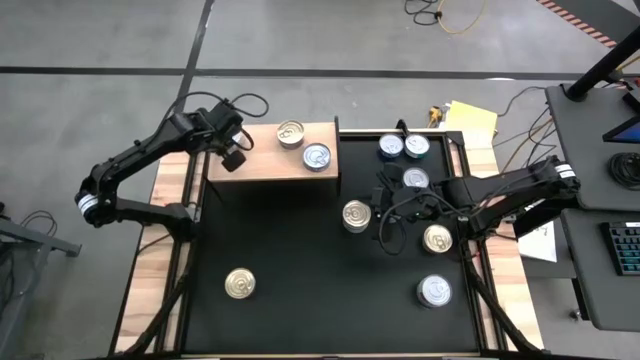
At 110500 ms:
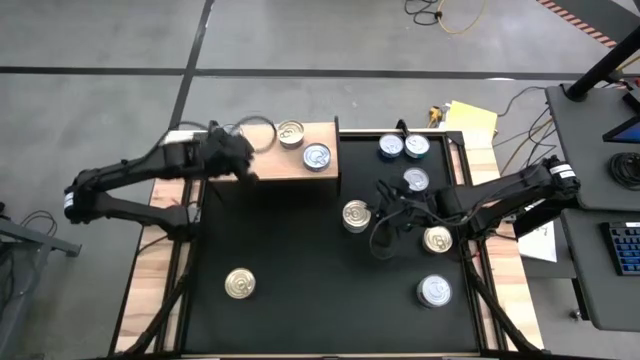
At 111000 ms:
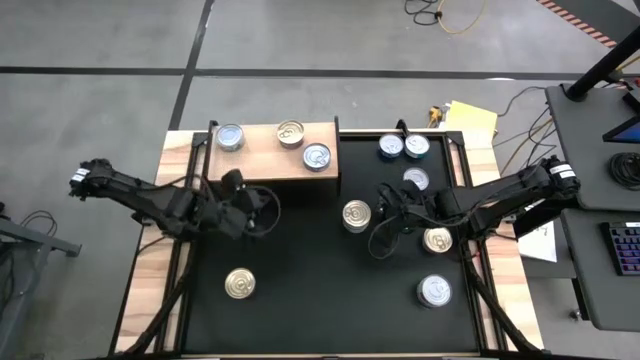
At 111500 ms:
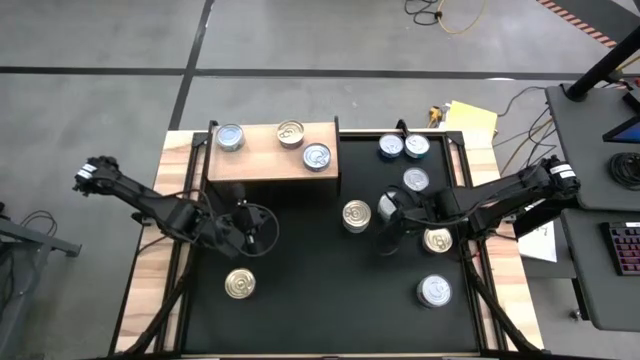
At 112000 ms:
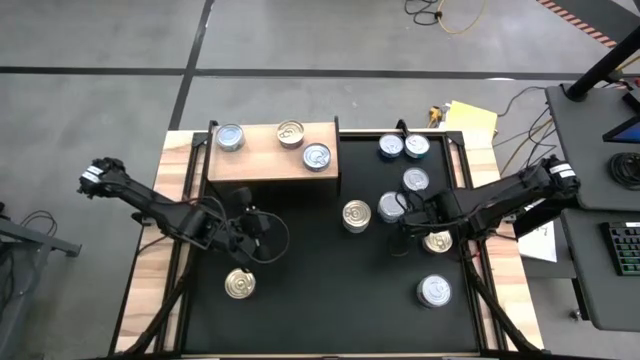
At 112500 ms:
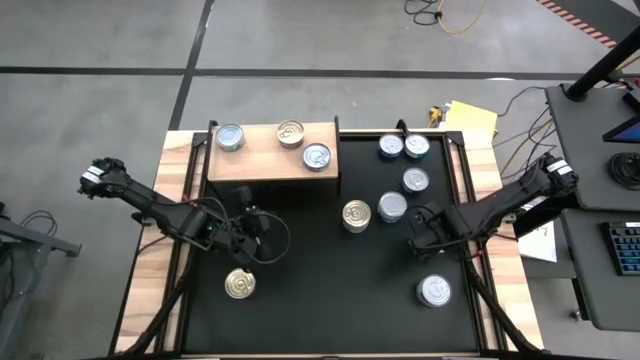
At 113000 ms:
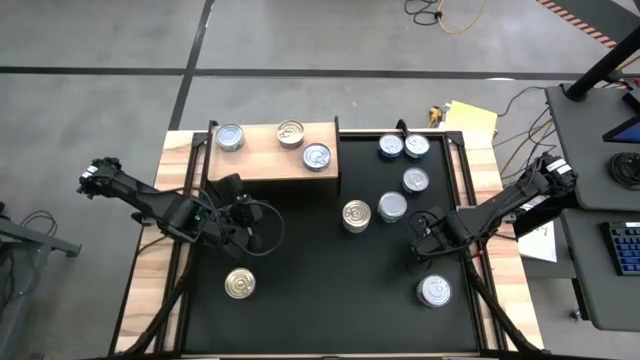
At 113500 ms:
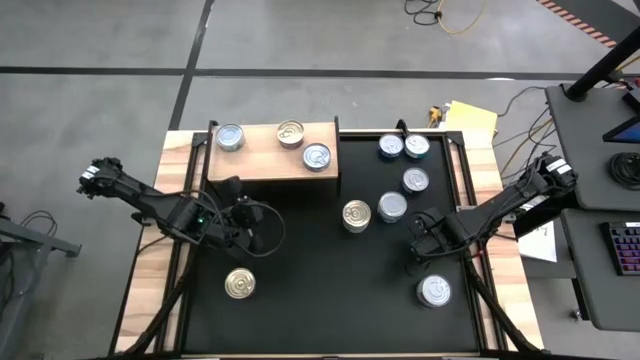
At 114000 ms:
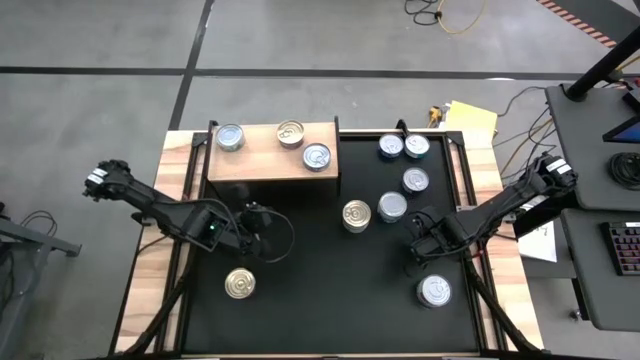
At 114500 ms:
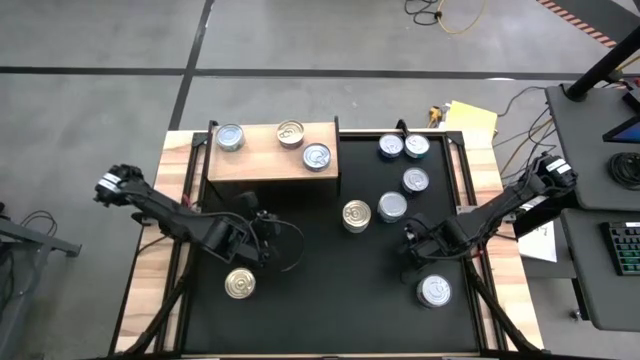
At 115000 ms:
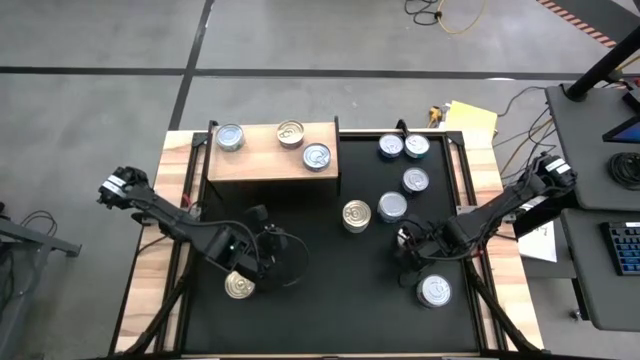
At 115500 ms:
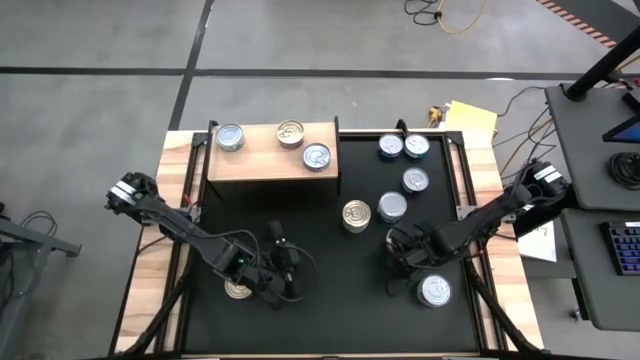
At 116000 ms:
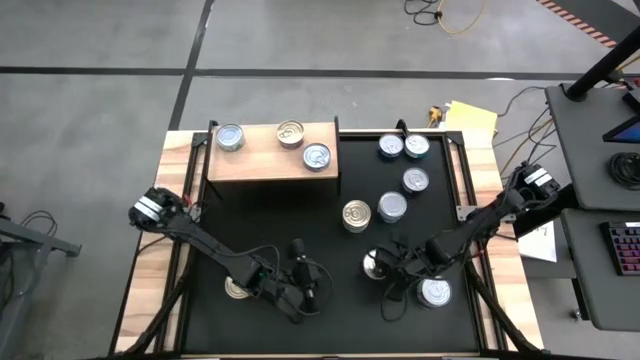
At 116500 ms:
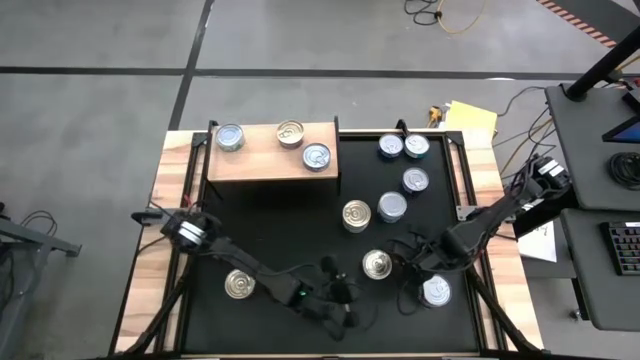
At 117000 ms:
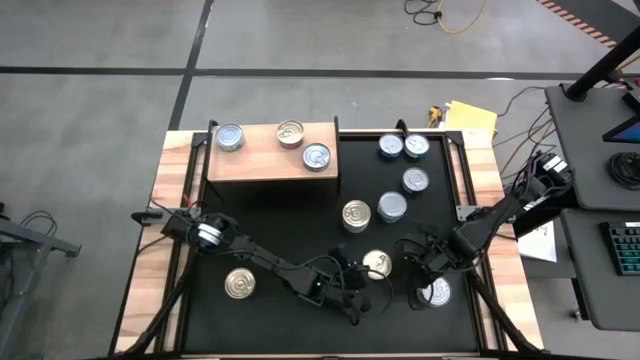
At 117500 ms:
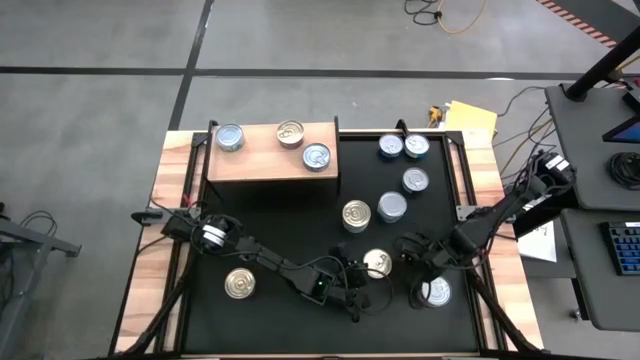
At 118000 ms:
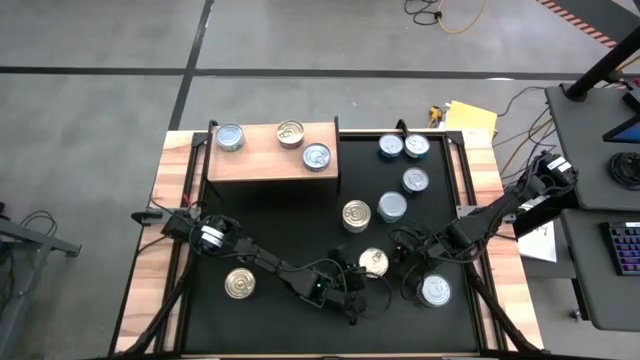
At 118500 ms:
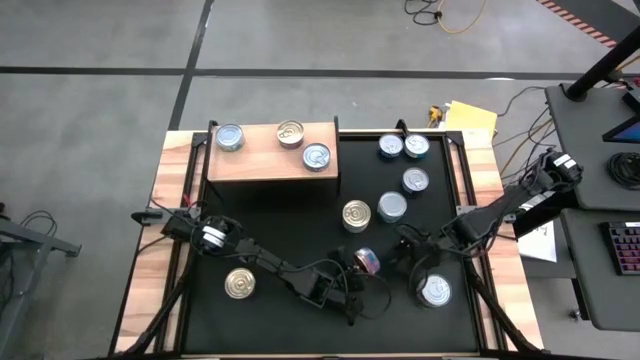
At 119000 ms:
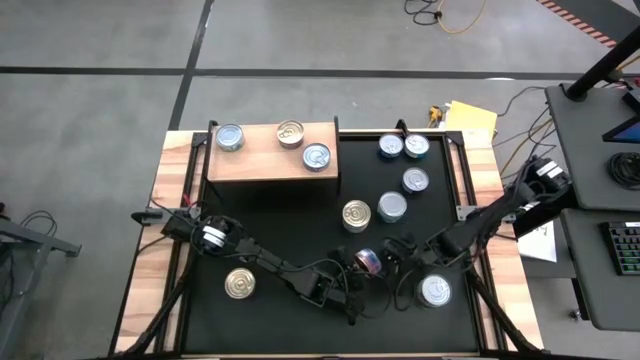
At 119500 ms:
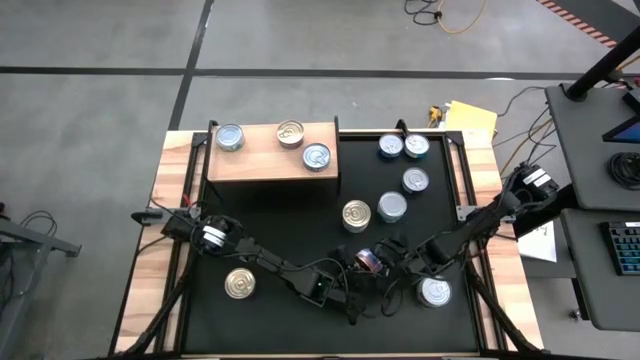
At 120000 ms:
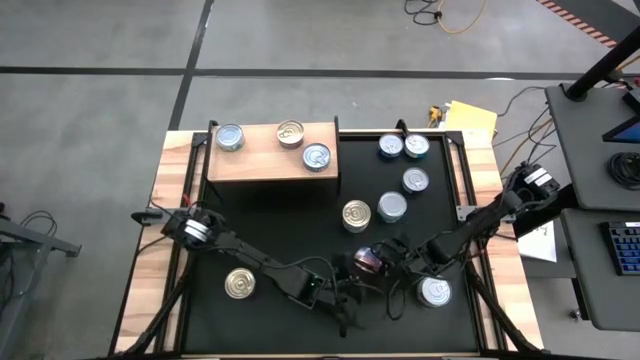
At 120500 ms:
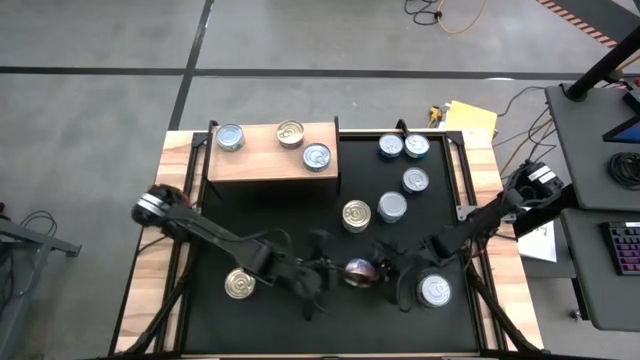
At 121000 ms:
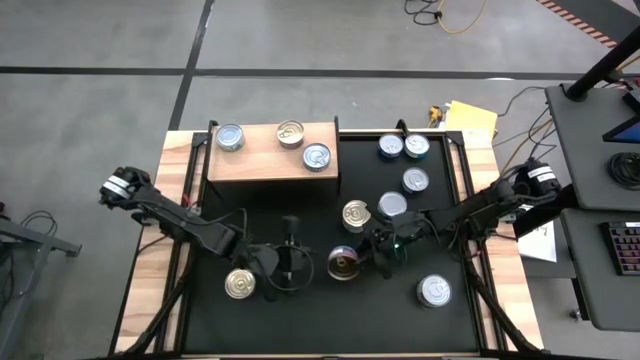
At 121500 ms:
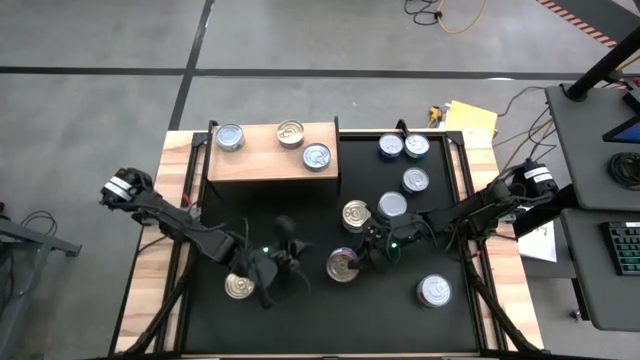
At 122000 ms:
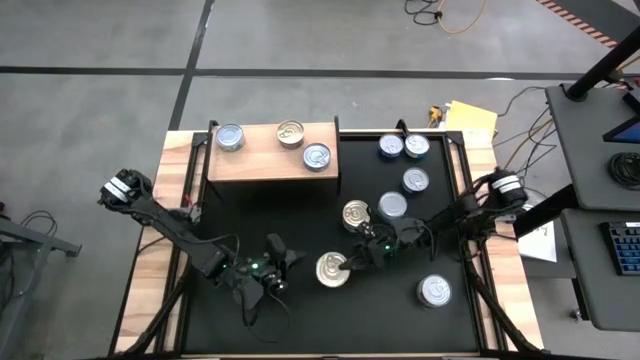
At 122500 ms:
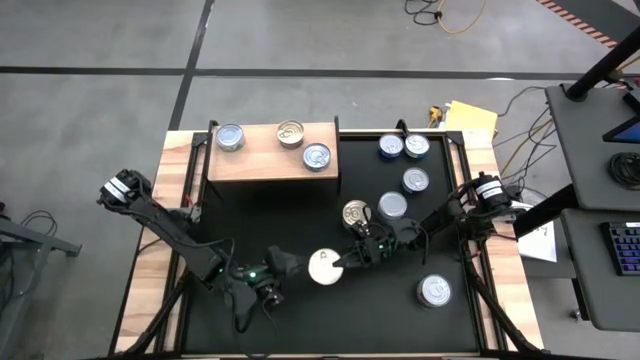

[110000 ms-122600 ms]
Task: Stack canned seafood by type on shelf
Stack the blue/pink tuna can on top of the other blue/pink tuna can on the shelf

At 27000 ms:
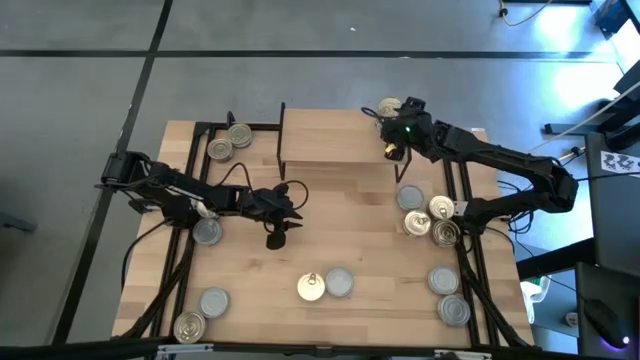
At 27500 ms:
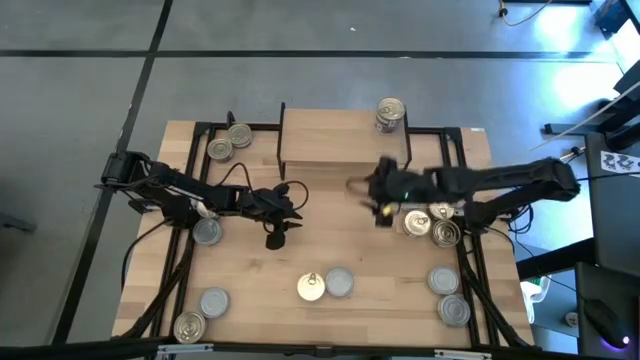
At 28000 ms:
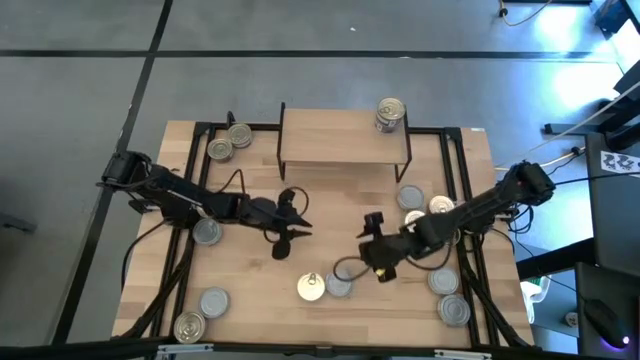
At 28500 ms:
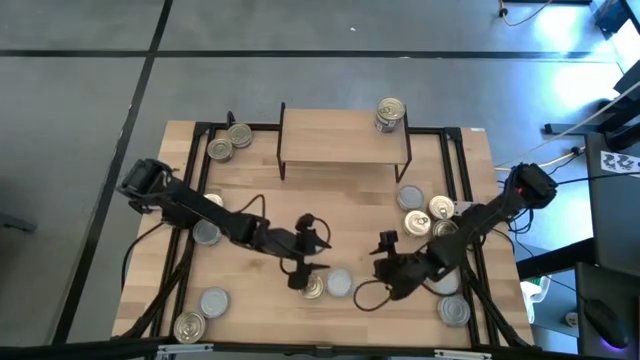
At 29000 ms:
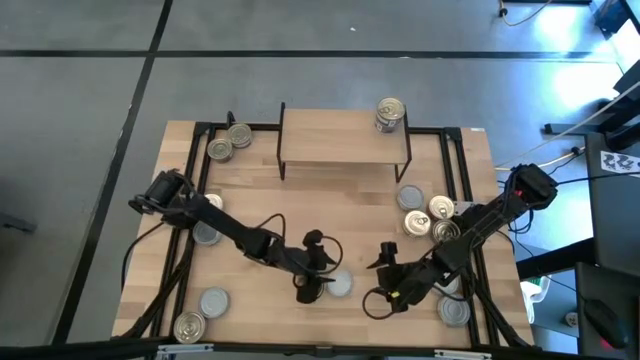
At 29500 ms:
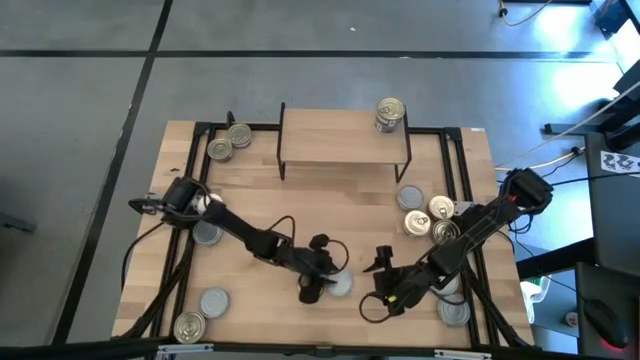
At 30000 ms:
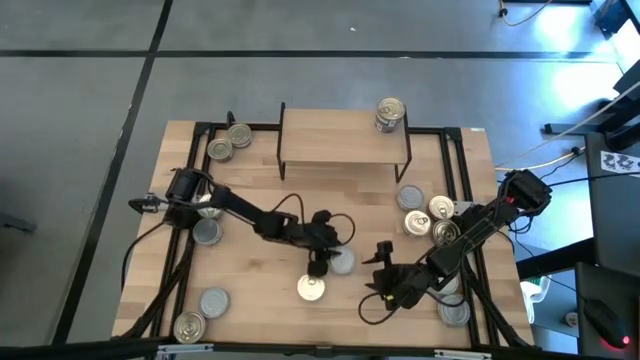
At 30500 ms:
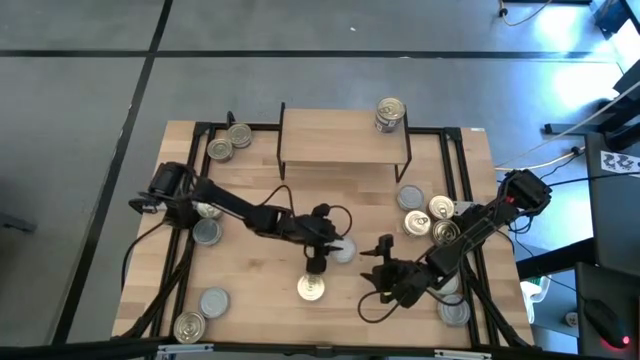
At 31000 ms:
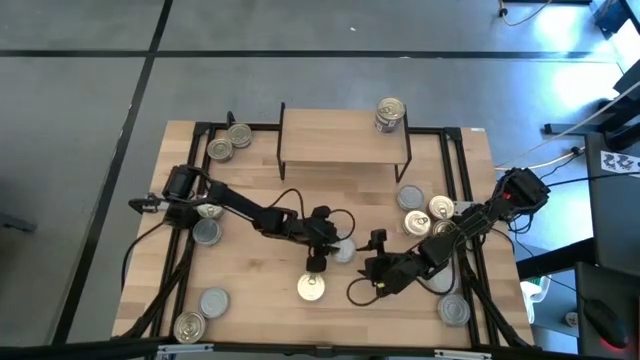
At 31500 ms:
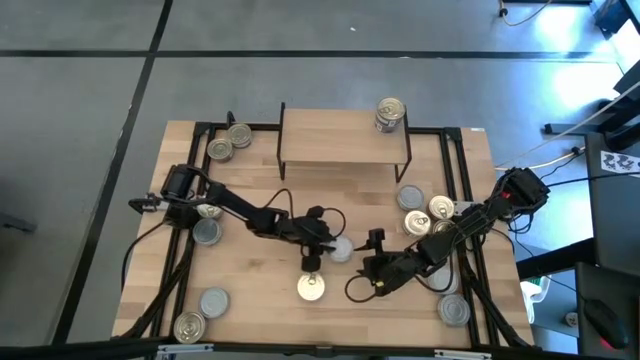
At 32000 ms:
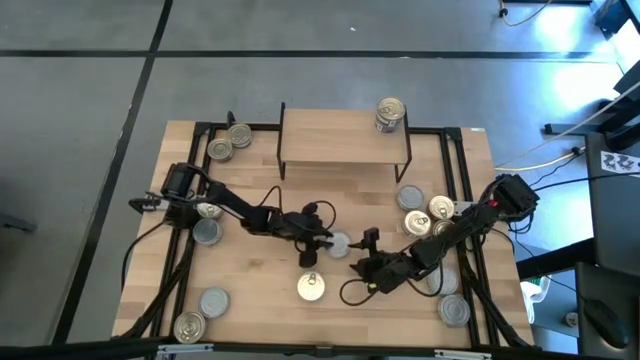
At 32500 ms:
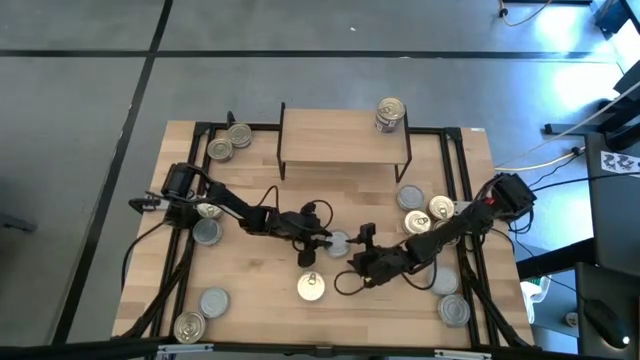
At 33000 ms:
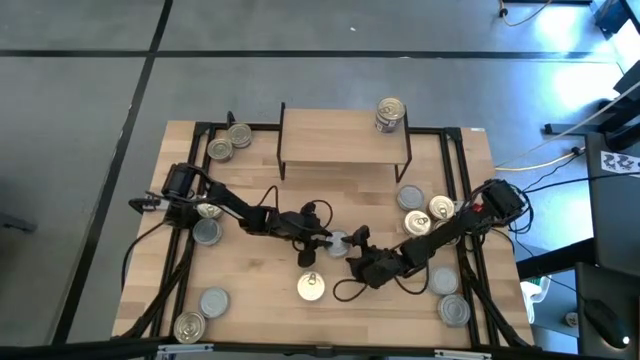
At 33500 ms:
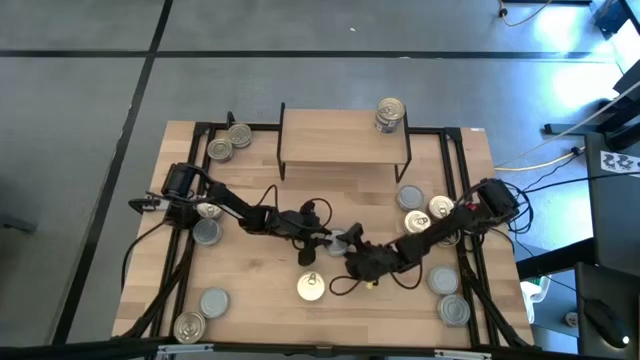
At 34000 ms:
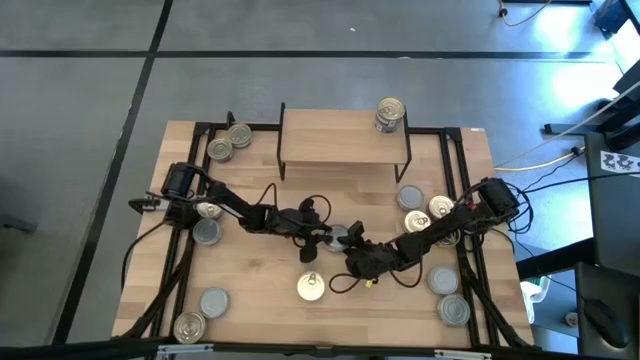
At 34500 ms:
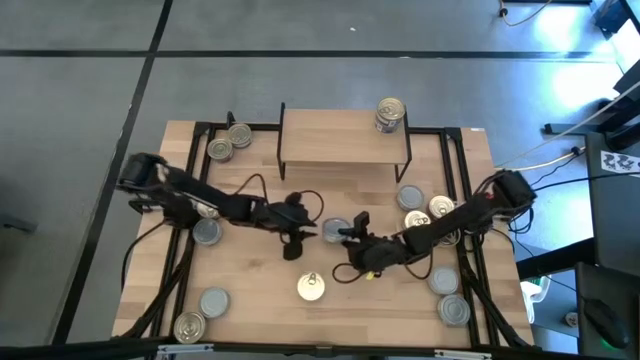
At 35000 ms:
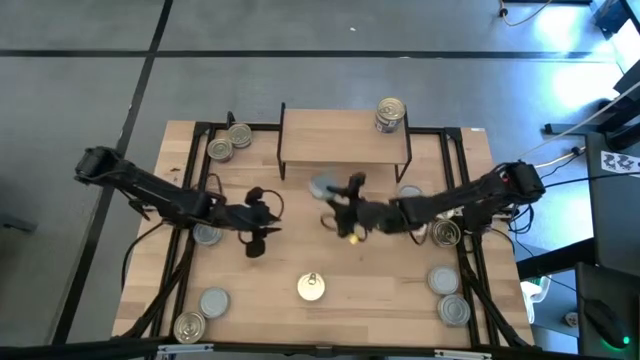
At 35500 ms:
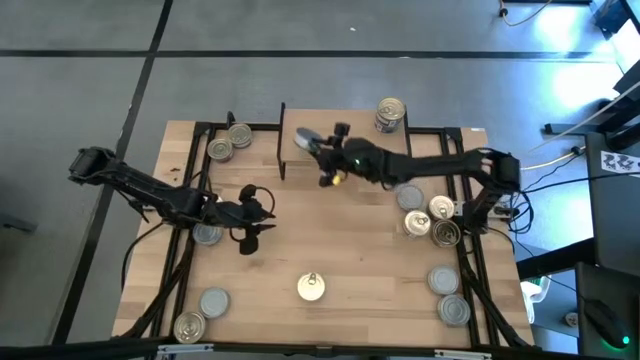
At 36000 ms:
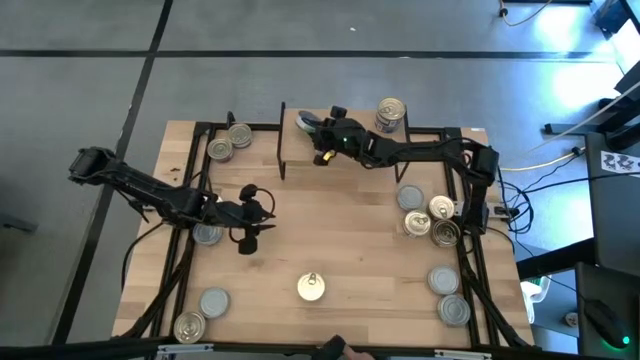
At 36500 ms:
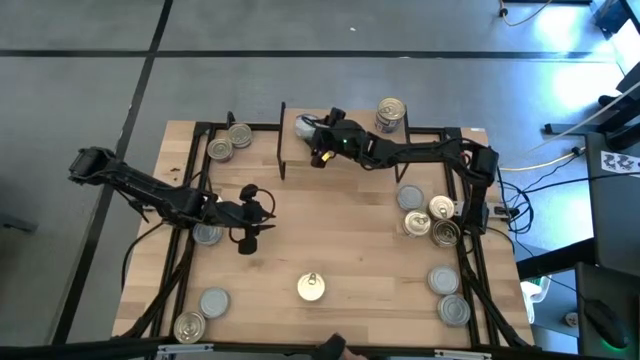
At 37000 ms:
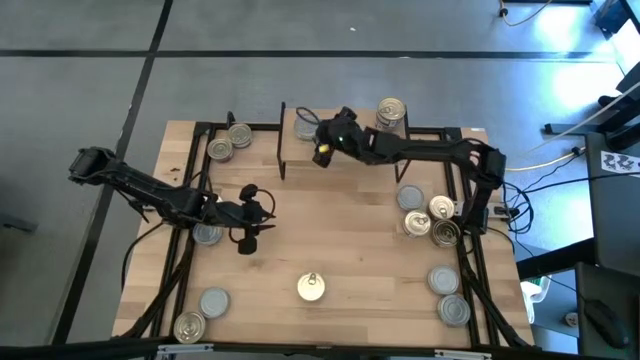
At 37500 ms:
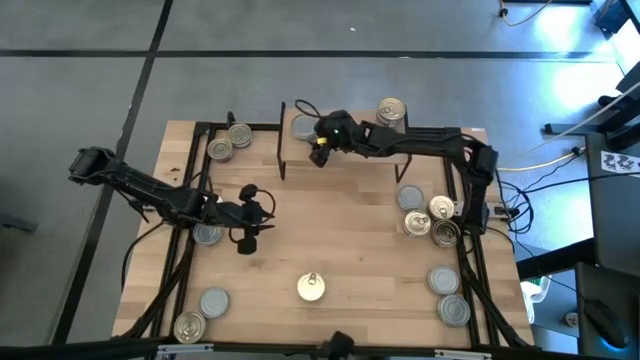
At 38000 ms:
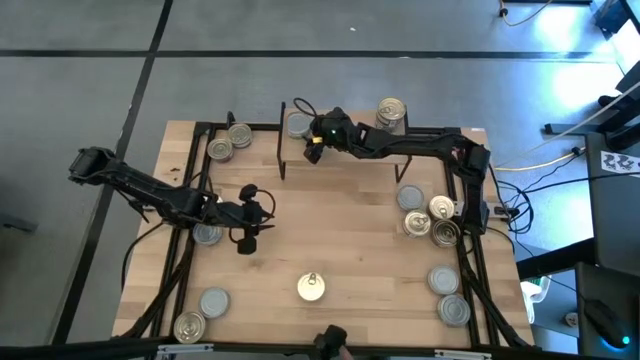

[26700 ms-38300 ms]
Task: Stack canned seafood by type on shelf
Put the green white tuna can on the shelf
